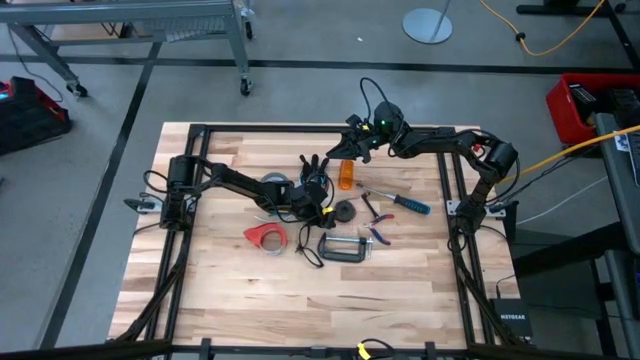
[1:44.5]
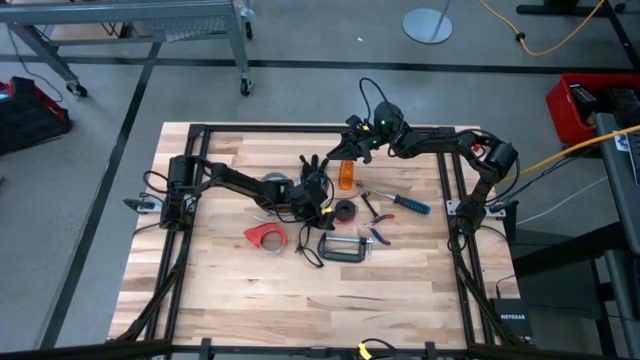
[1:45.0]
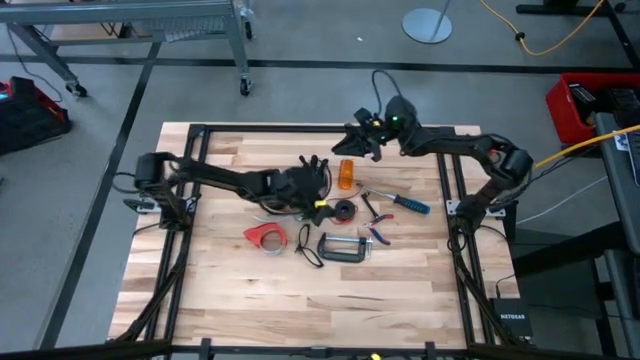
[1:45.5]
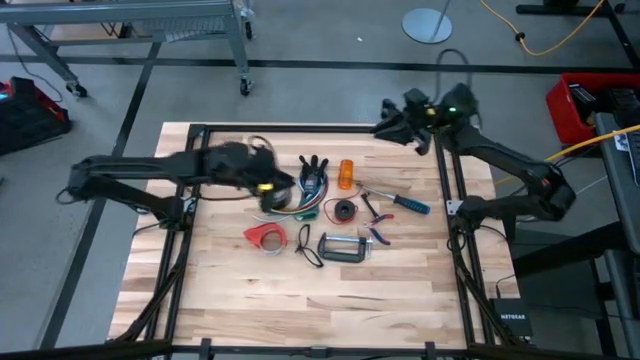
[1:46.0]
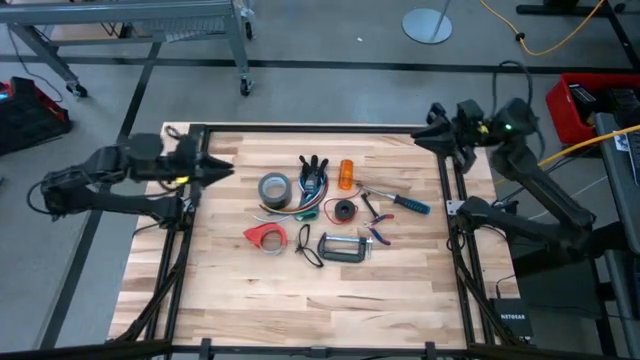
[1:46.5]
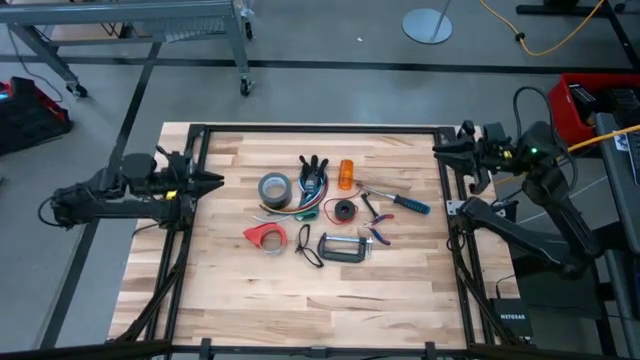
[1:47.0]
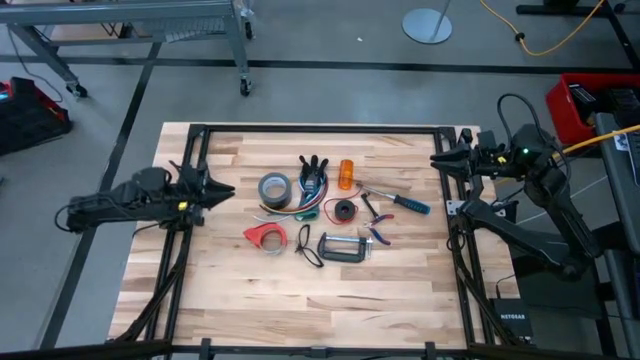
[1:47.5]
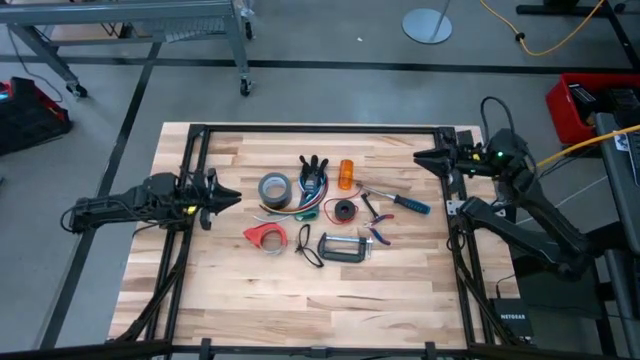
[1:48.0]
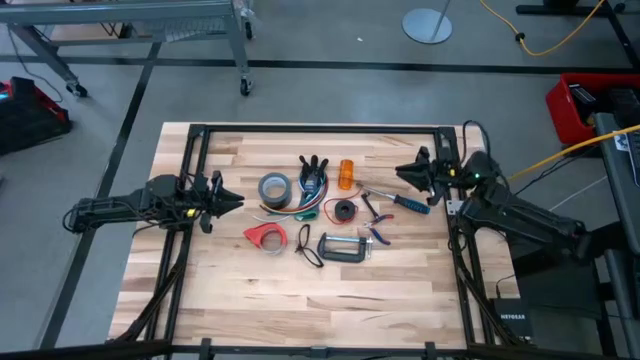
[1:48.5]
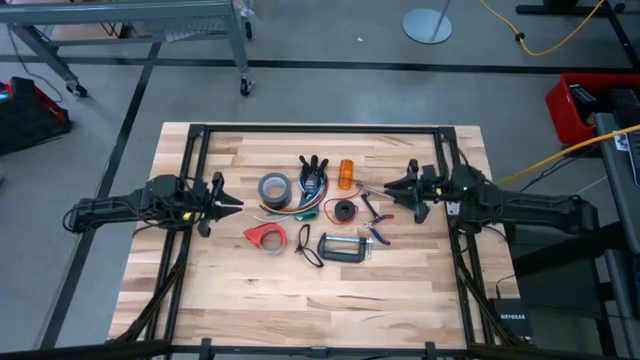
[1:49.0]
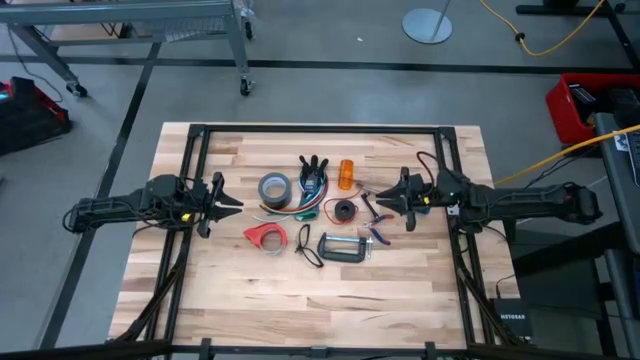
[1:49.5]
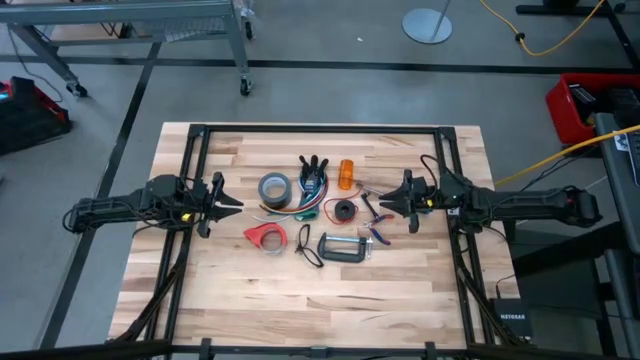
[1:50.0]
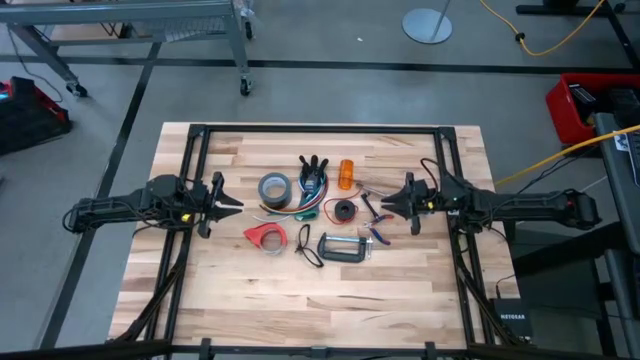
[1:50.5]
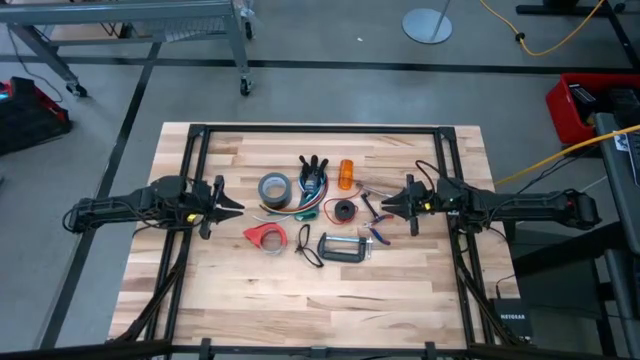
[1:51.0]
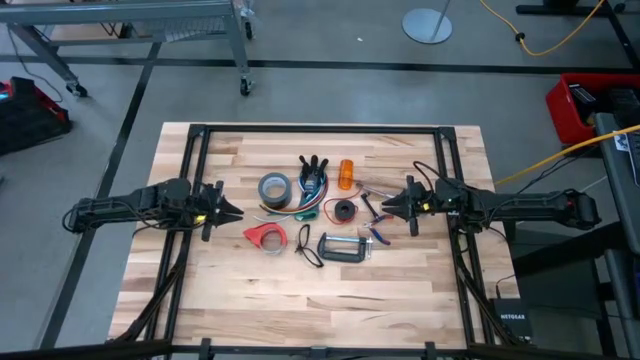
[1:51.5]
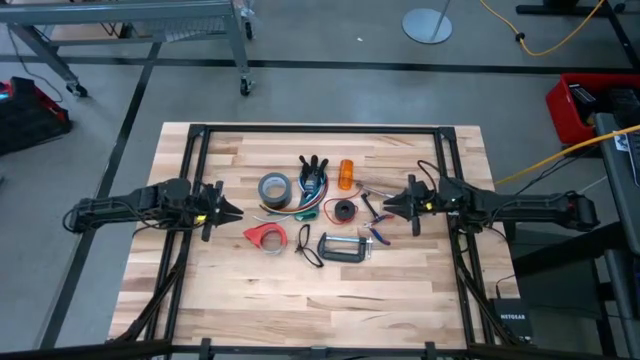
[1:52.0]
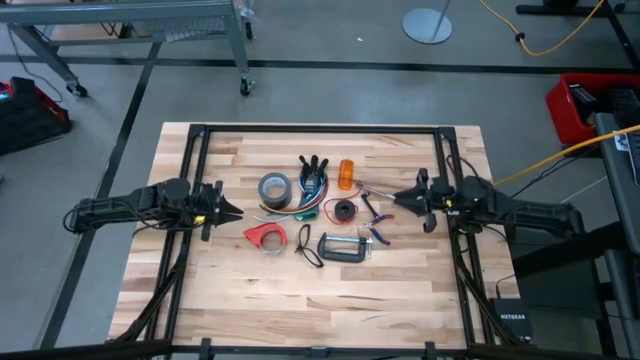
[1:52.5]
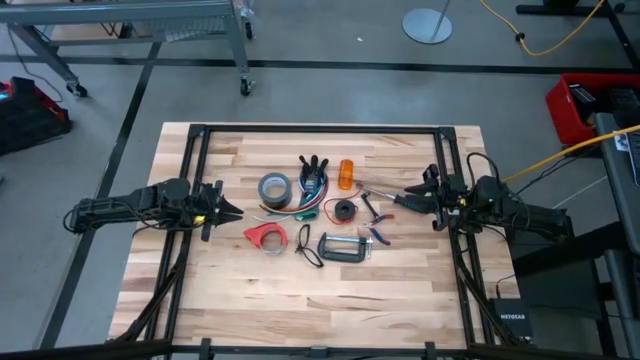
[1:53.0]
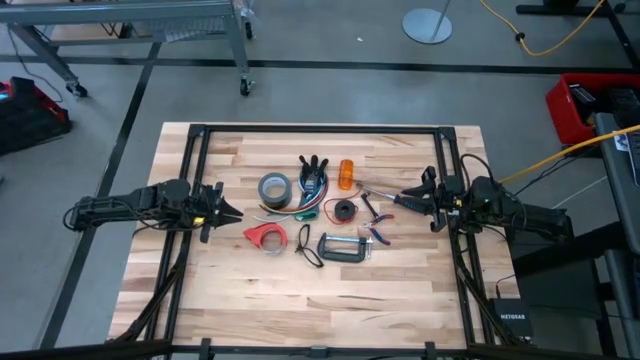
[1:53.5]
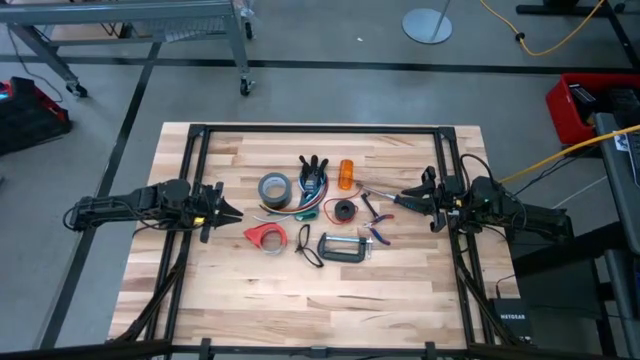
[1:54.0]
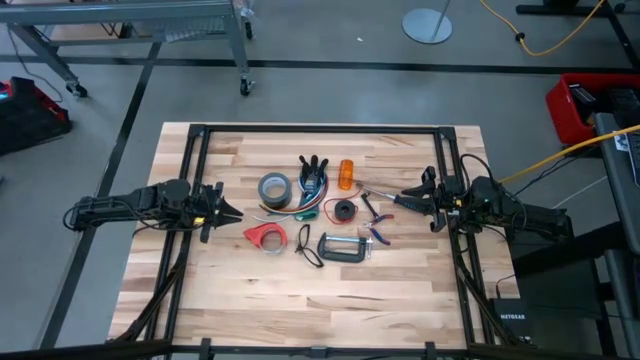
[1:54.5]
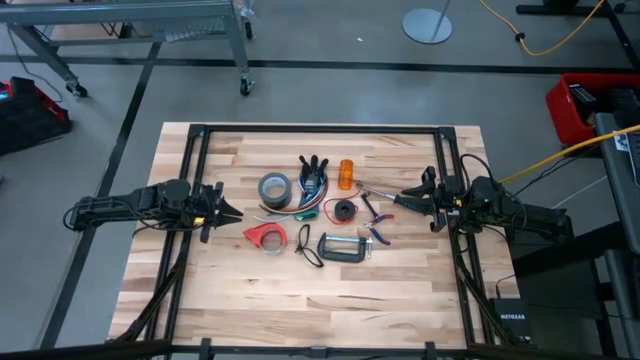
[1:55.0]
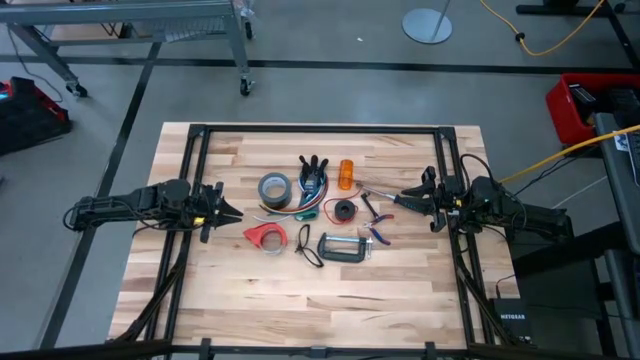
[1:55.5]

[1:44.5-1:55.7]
Task: Coil cords
Return to Home Position

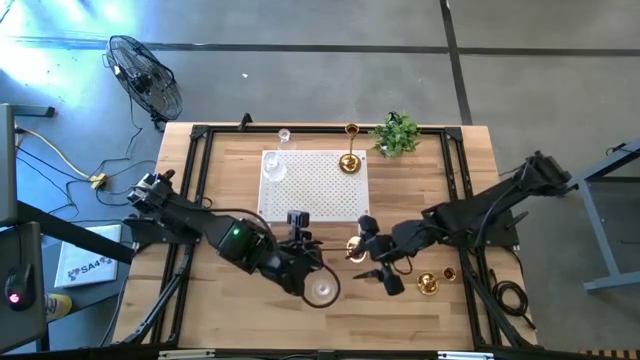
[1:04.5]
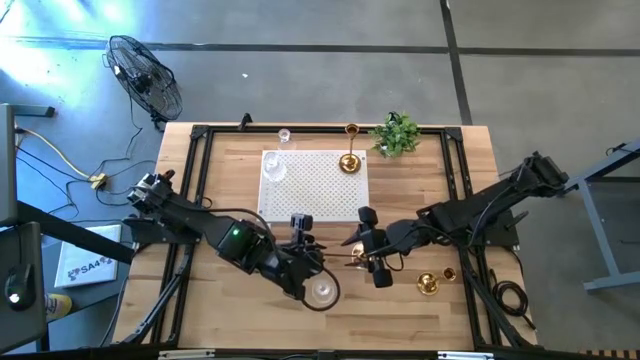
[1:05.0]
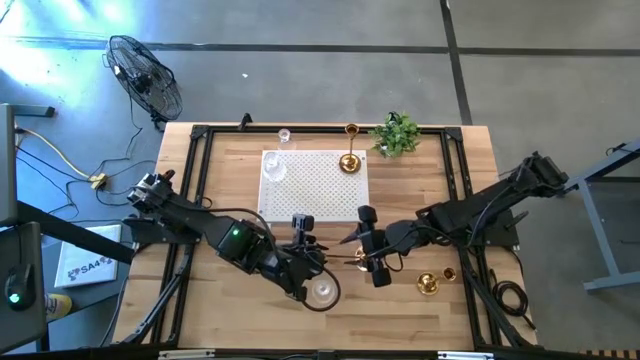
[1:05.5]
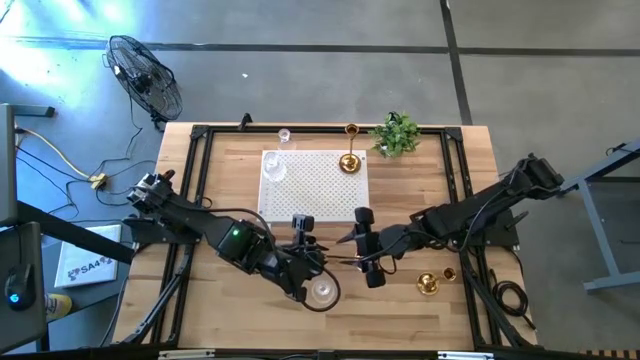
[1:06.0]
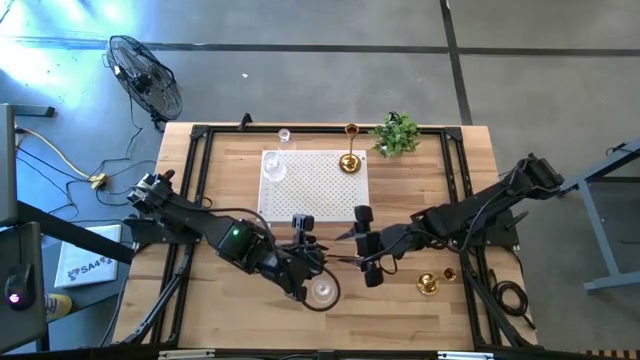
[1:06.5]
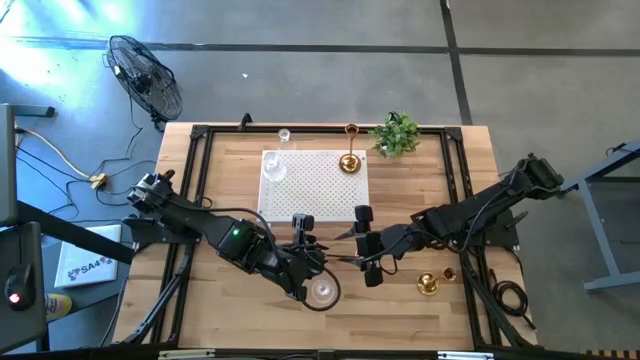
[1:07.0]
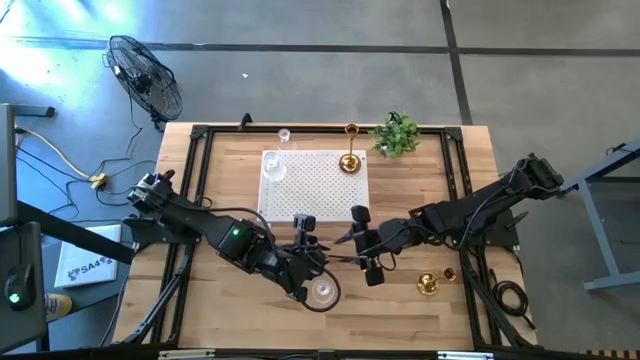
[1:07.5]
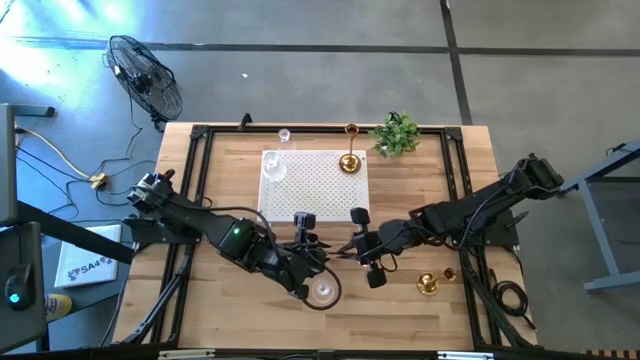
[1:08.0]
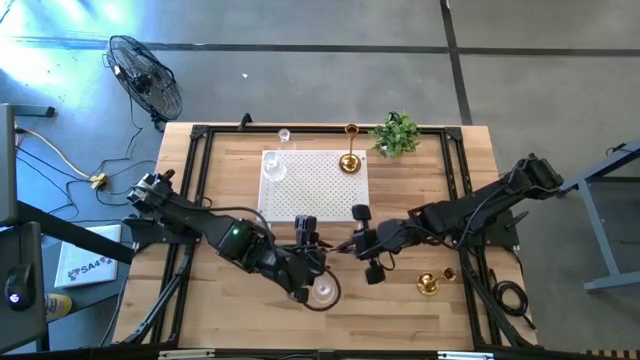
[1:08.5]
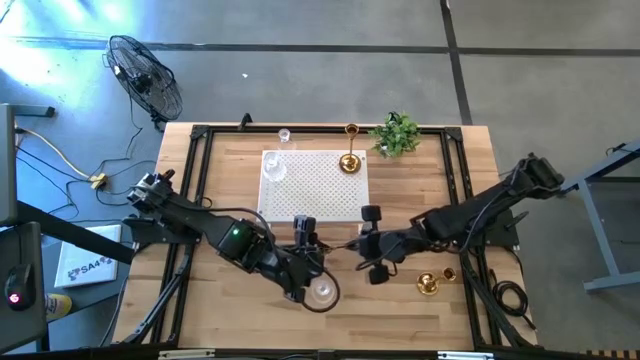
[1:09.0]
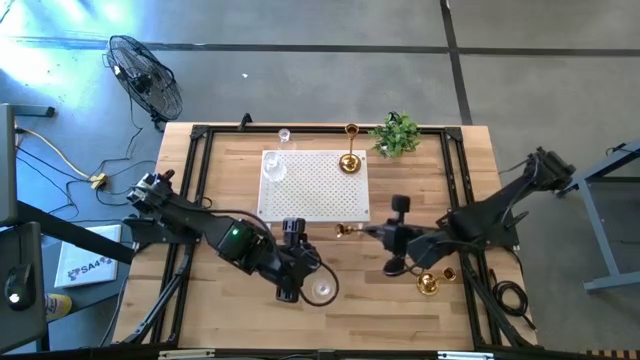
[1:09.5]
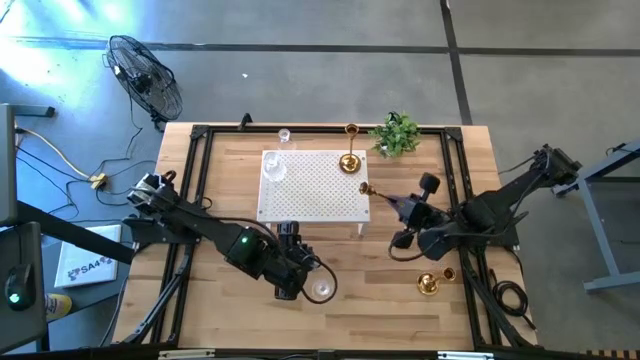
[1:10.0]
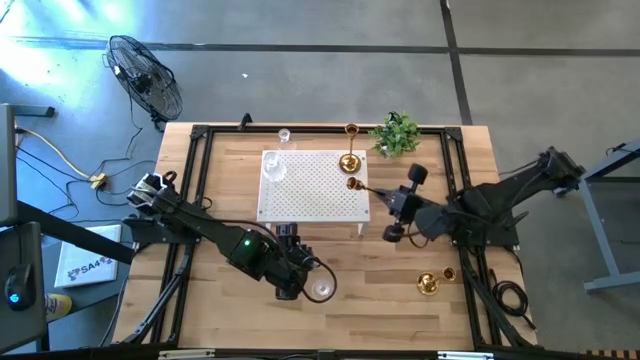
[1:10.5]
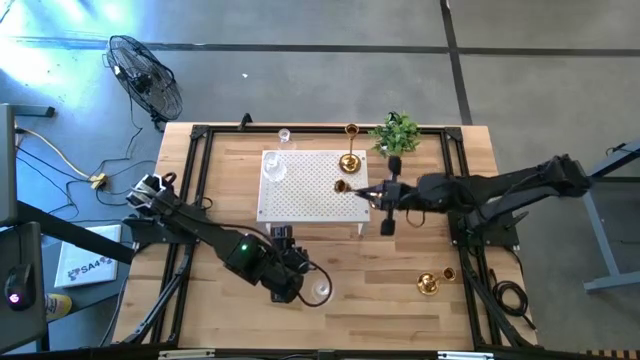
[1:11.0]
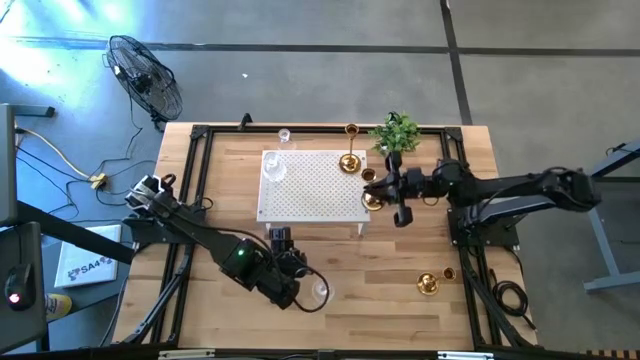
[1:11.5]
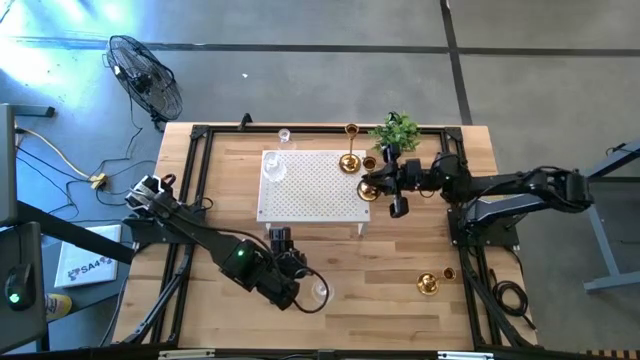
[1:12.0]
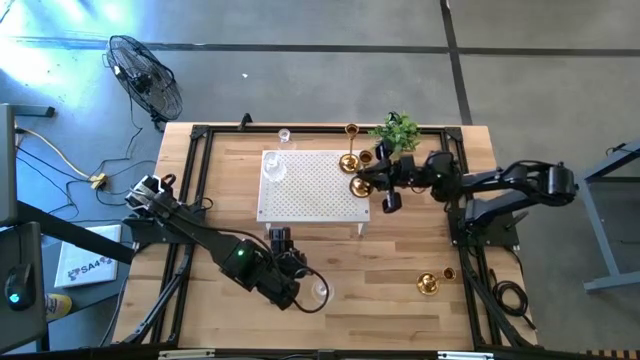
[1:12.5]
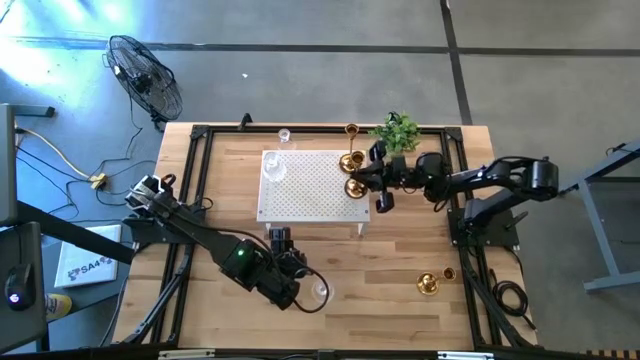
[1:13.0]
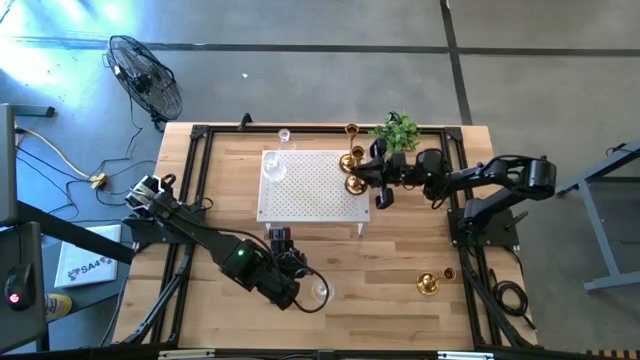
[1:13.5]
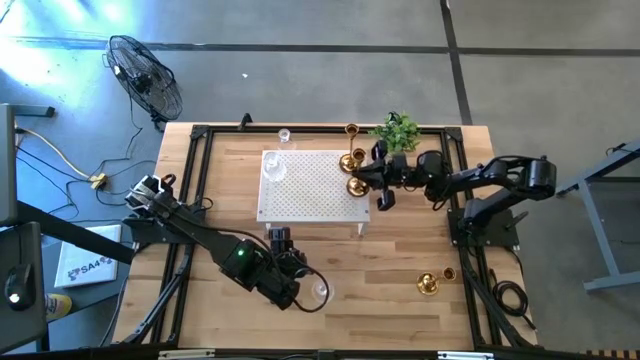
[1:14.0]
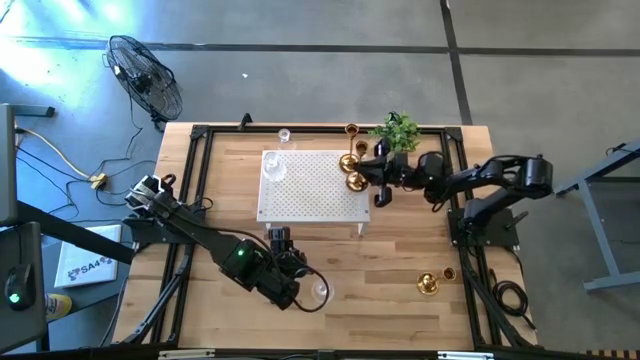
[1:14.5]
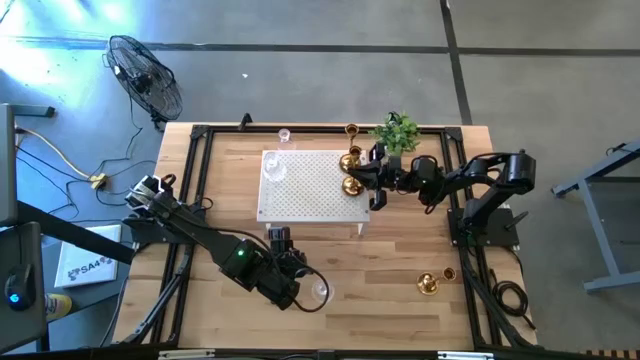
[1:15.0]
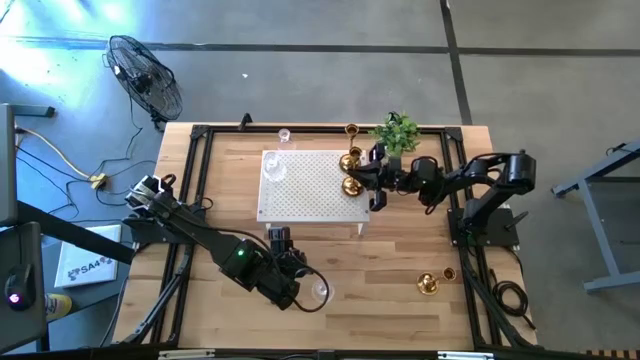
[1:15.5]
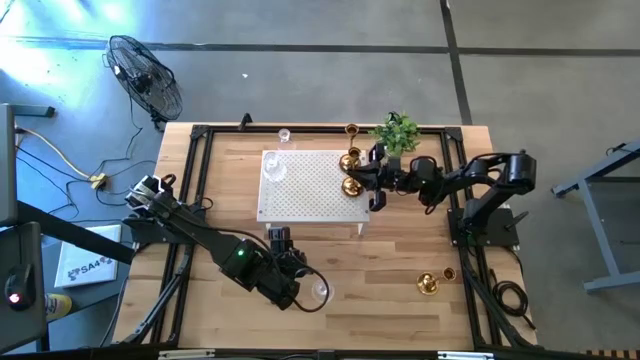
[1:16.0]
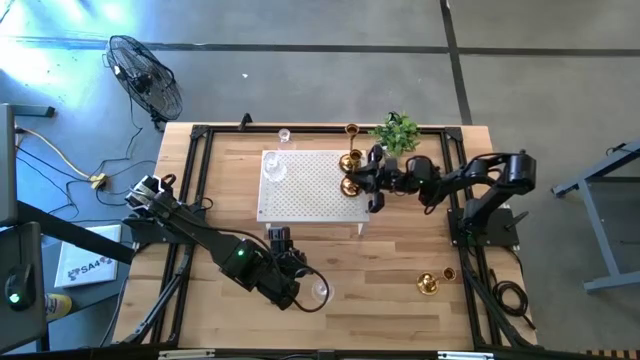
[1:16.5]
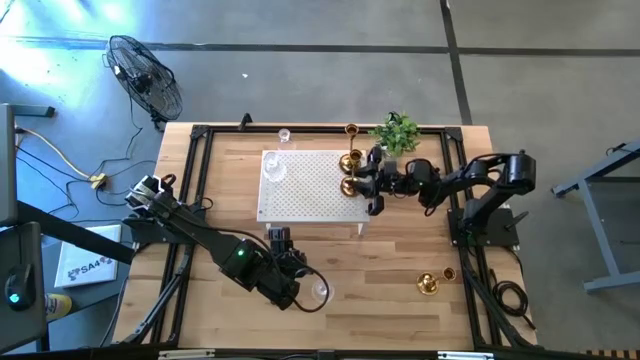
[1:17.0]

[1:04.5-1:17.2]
Task: Pick & Place candle stick holders
Put the left gold candle holder on the shelf aligned with the other gold candle holder
